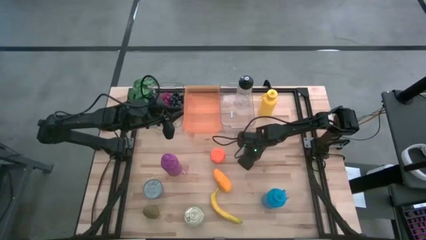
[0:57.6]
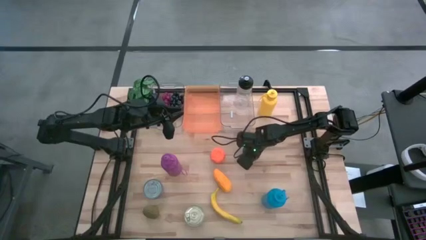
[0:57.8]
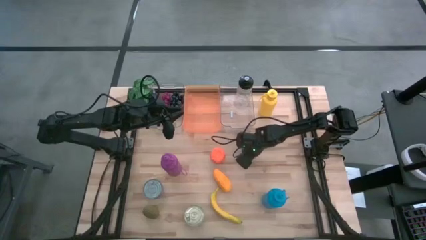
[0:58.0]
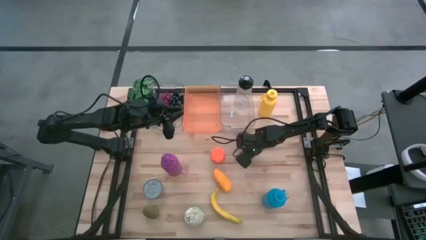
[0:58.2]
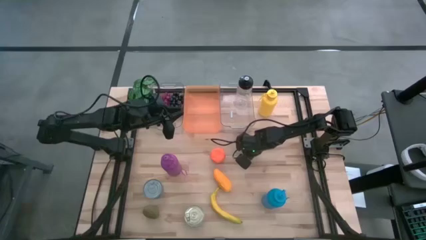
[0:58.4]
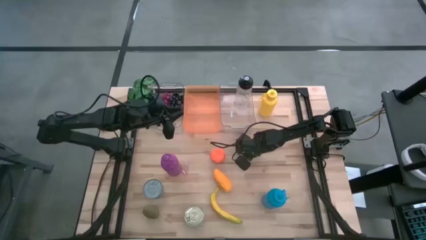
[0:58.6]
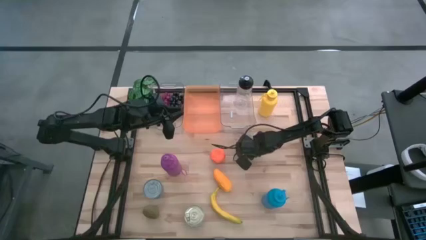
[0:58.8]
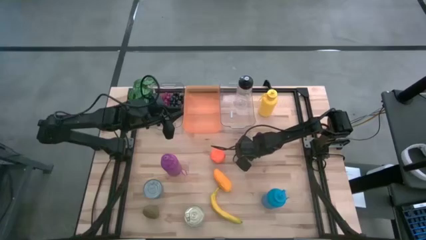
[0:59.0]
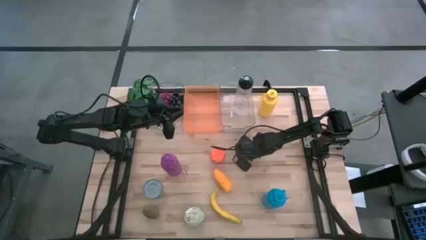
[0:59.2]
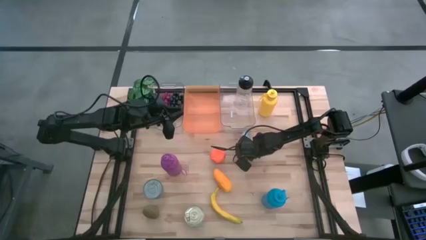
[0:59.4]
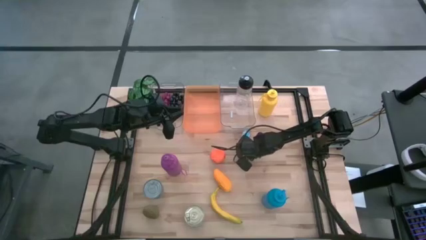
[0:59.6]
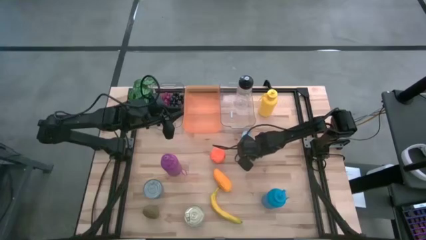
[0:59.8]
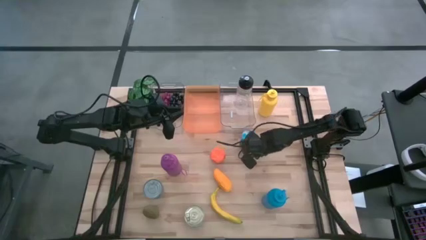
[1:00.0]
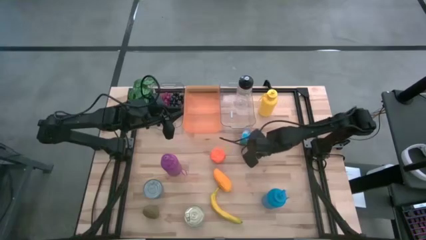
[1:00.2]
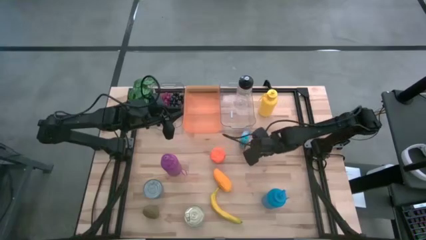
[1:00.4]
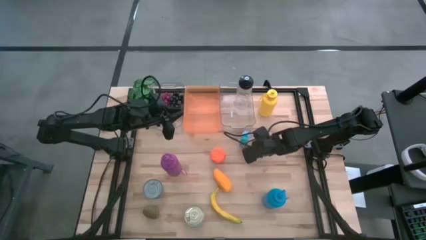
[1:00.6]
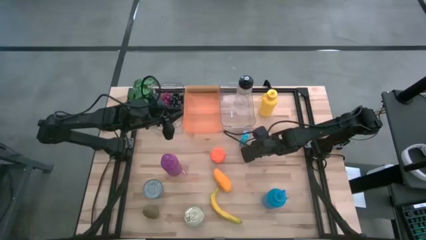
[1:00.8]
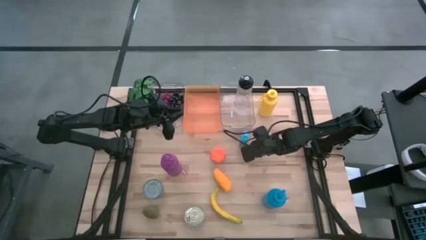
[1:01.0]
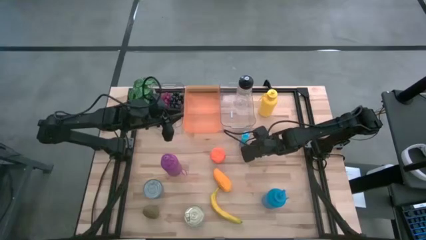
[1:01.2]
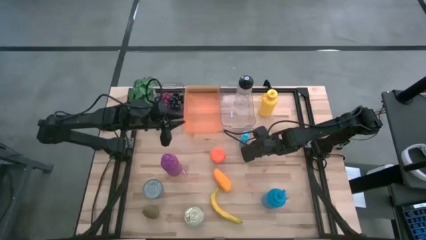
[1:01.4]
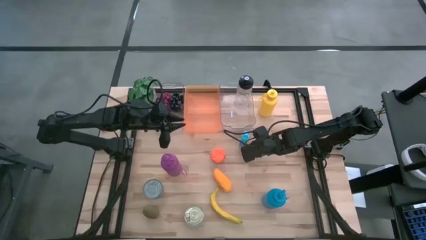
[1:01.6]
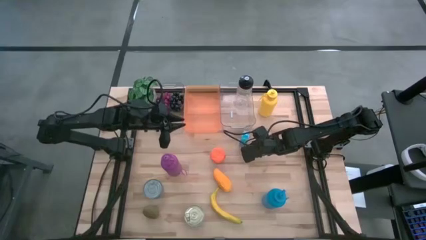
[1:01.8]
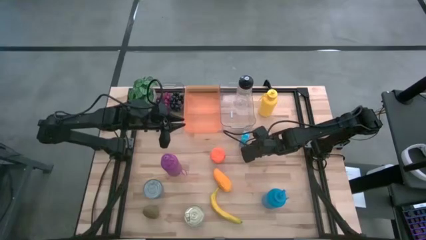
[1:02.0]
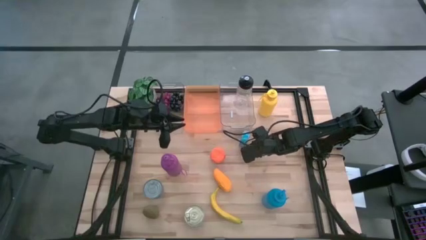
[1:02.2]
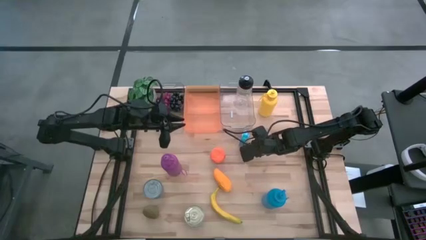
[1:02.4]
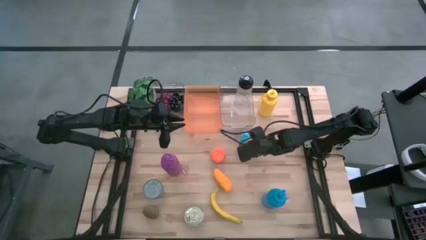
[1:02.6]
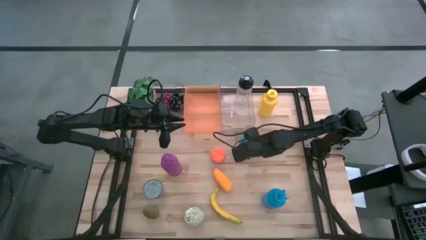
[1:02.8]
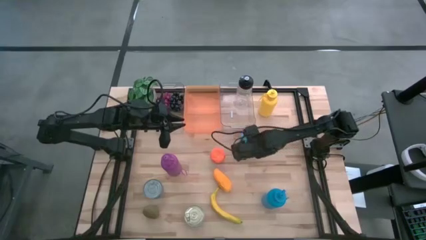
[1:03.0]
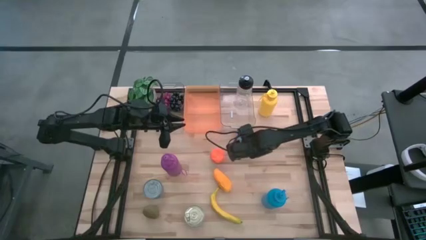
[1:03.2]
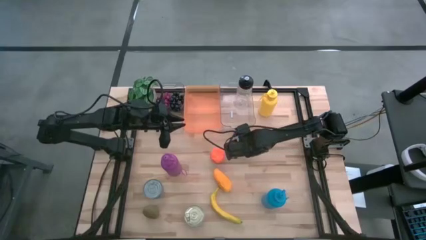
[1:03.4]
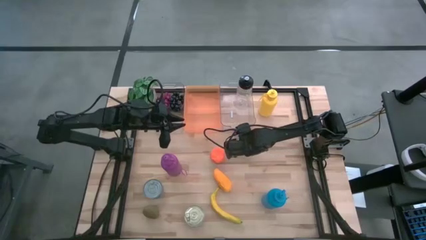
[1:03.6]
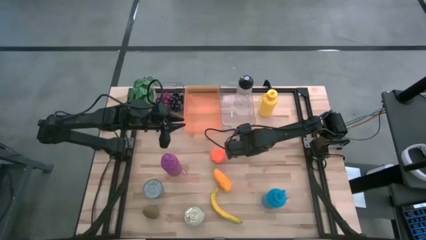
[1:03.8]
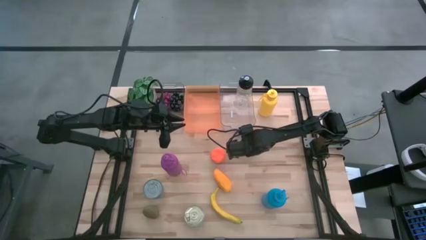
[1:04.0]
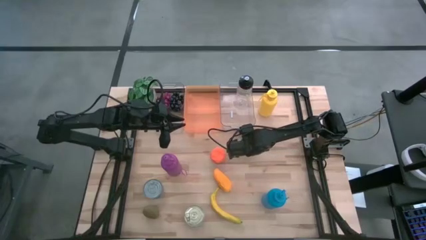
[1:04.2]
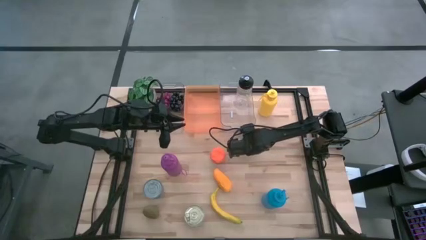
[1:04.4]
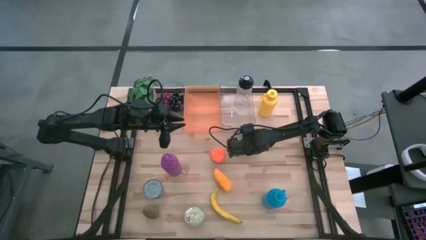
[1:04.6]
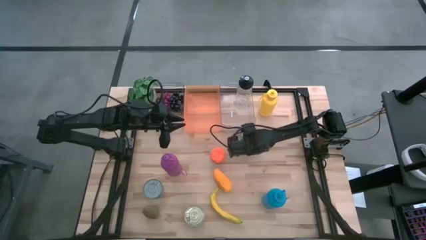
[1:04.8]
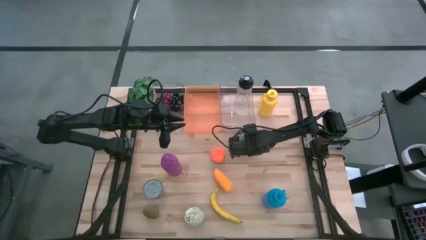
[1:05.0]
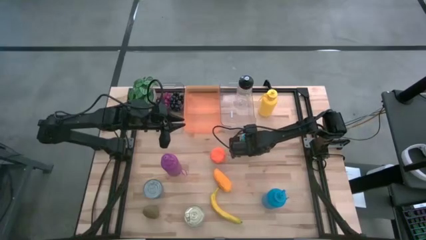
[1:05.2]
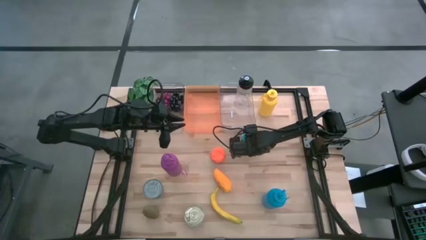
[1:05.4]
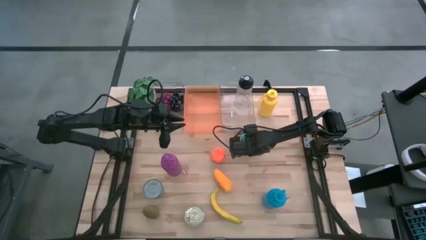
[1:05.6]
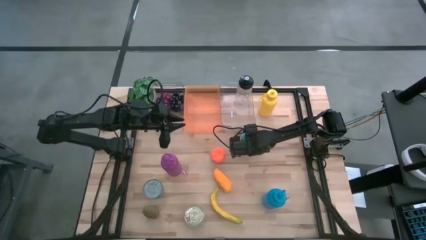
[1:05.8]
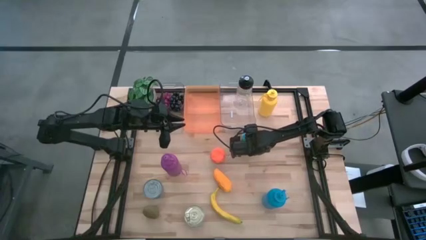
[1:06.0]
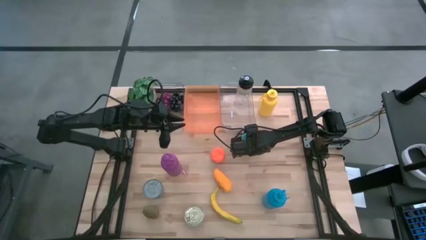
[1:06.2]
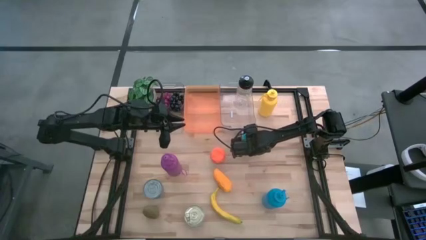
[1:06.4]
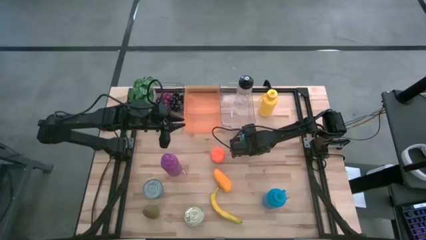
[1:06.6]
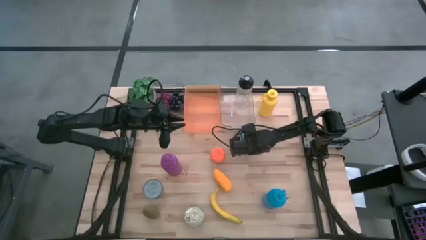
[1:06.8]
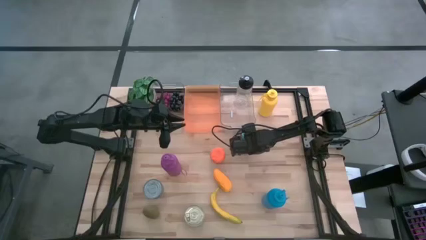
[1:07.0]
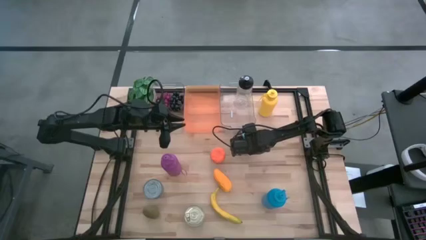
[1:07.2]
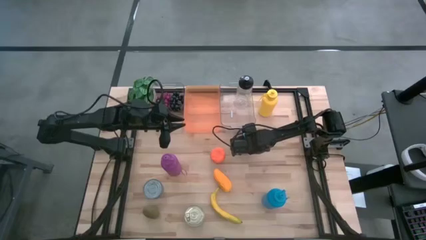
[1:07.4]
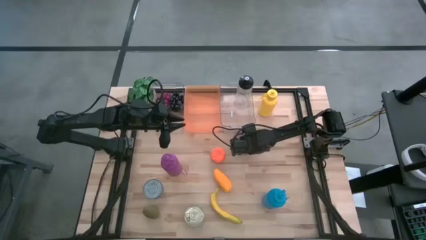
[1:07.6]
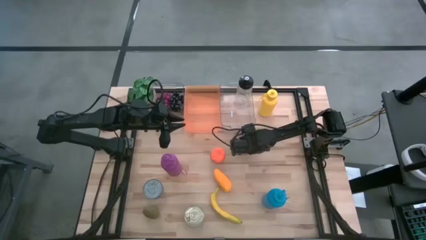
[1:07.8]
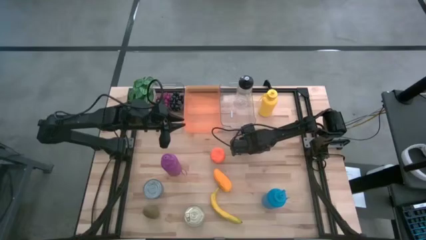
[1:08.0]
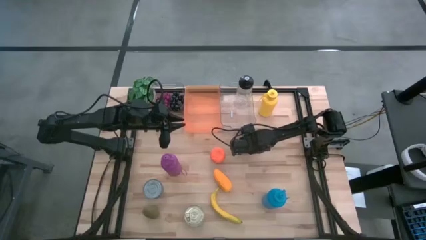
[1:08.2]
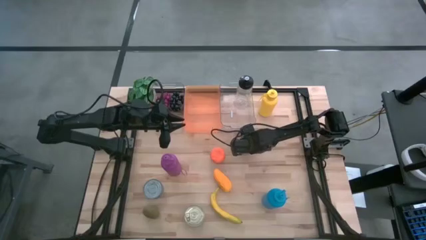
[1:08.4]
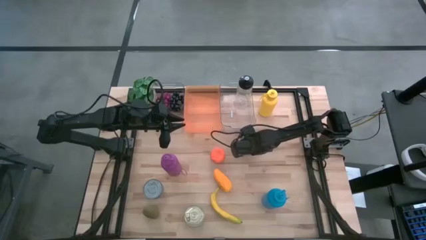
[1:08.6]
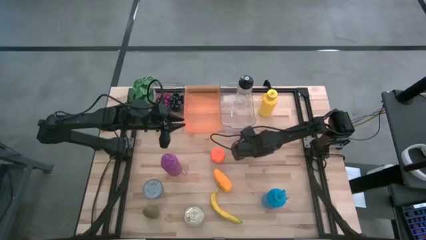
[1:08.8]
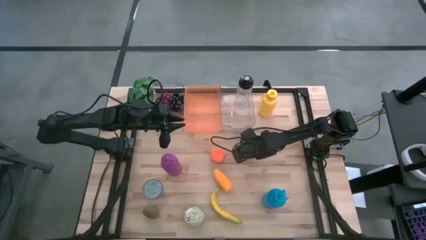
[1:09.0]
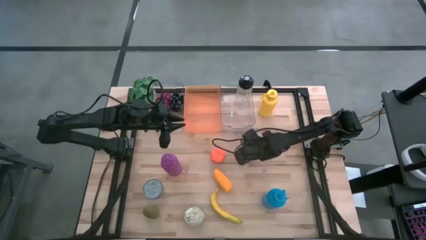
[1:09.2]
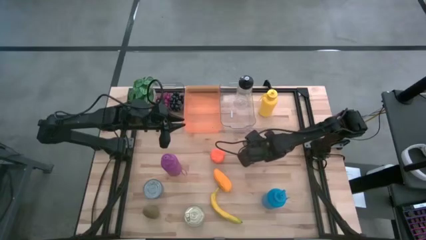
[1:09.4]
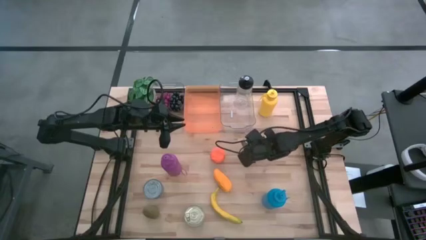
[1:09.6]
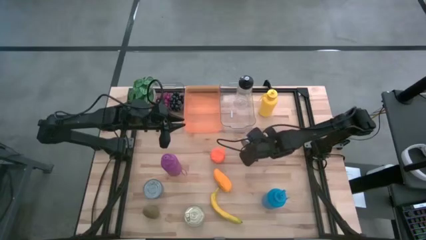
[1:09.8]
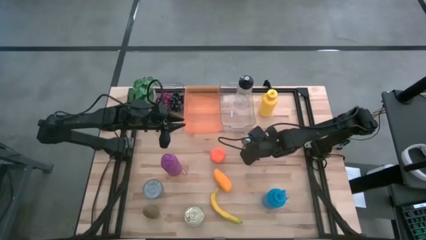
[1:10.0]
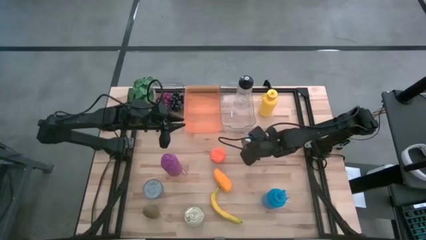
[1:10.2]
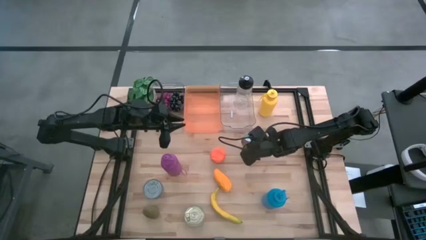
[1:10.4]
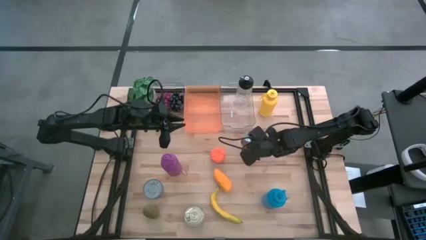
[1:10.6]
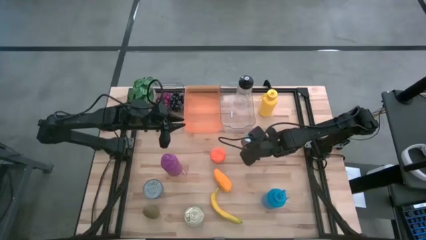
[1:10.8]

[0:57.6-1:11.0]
Task: Pick & Place Food Item
Put the yellow and blue tuna can into the orange bin

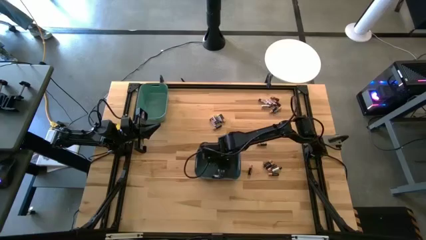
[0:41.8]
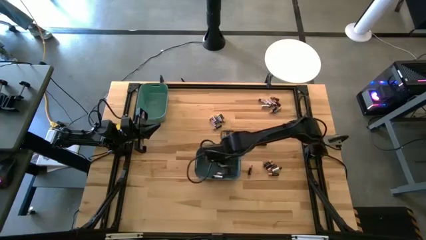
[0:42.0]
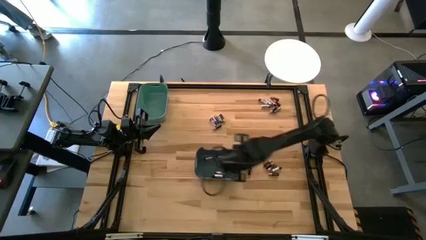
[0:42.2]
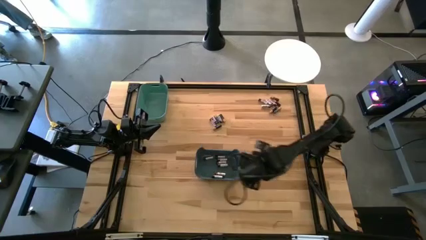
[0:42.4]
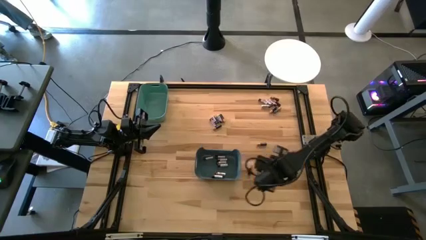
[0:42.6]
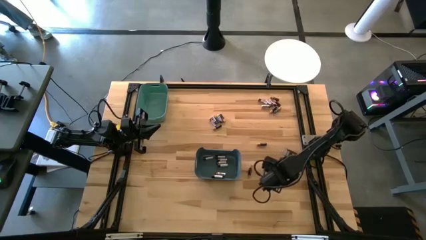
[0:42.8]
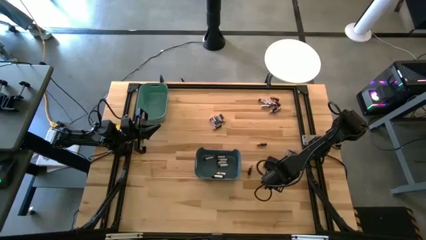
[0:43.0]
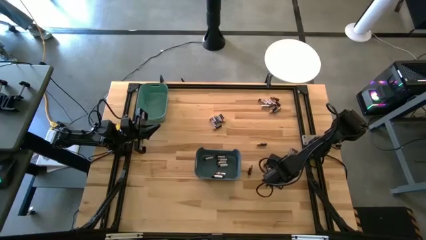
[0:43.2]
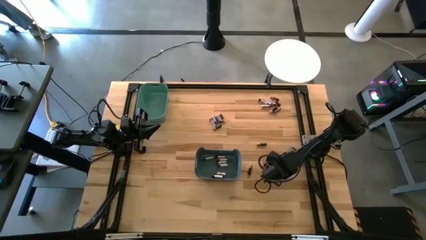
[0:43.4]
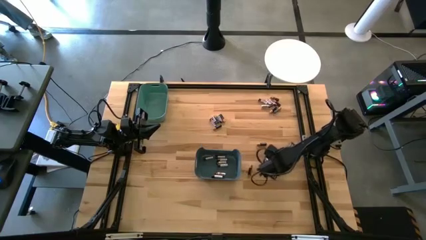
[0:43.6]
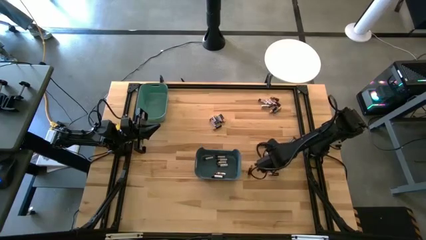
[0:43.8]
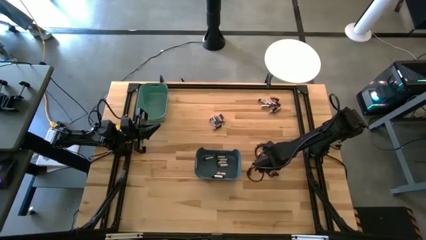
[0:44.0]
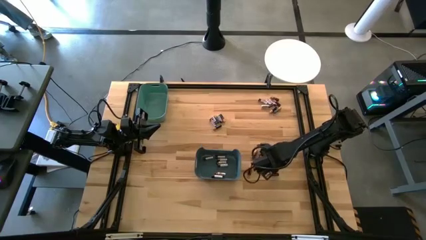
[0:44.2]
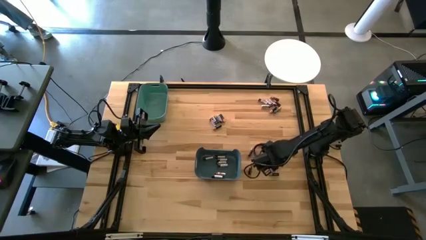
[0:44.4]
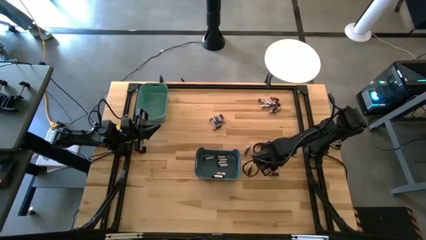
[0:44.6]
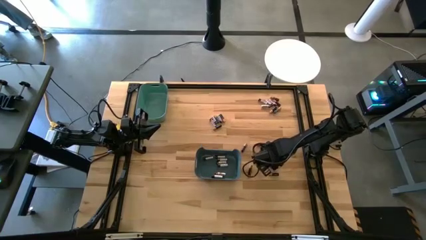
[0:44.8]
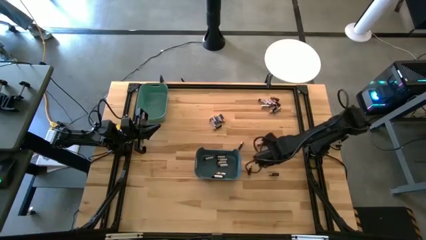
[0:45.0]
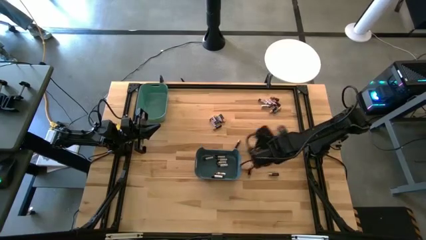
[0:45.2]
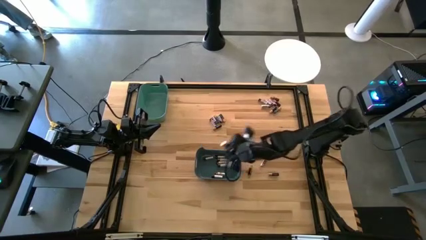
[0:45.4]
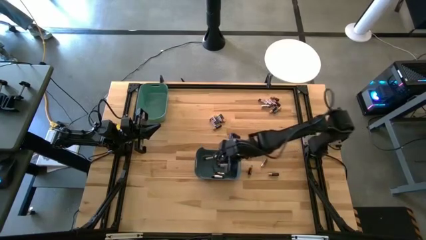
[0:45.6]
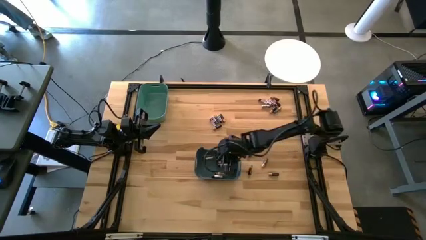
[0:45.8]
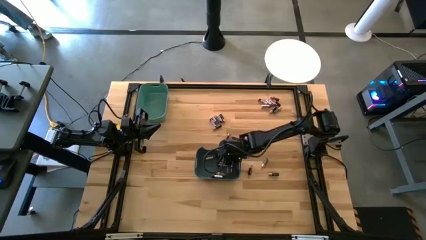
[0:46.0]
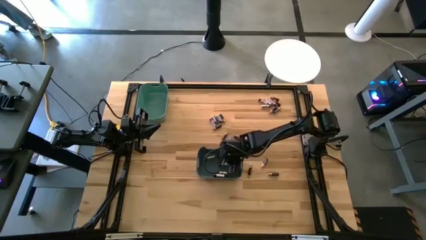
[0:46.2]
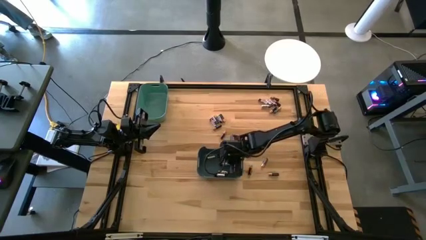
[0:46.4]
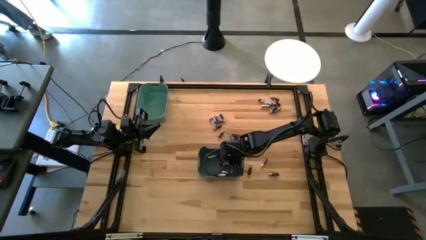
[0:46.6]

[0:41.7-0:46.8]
Task: Sort batteries
Put the silver battery into the blue bin
